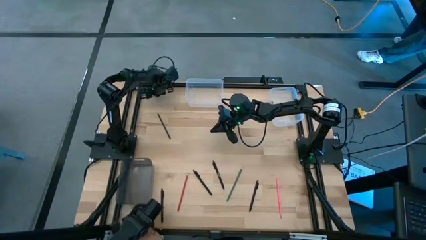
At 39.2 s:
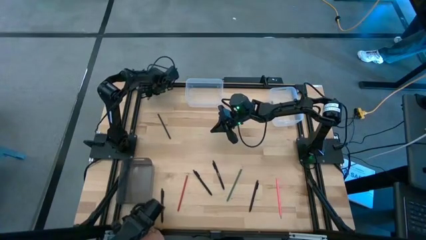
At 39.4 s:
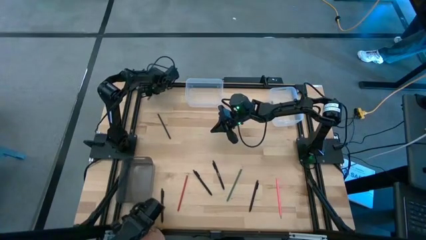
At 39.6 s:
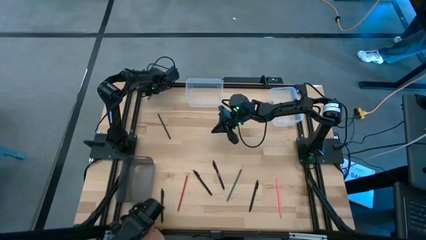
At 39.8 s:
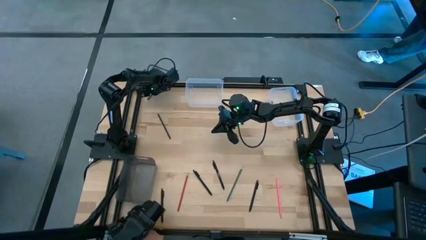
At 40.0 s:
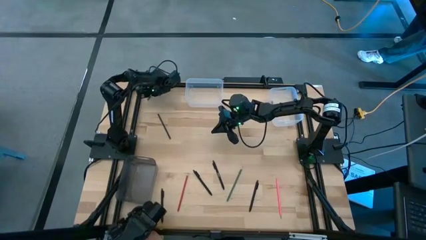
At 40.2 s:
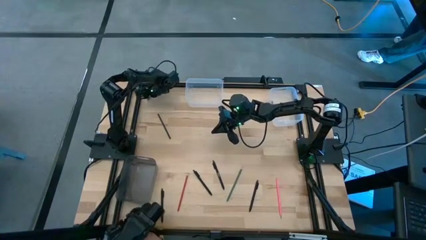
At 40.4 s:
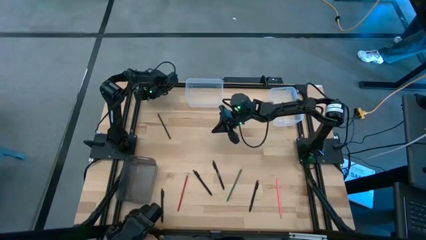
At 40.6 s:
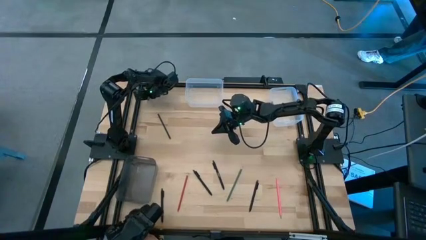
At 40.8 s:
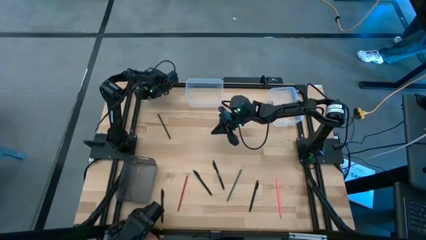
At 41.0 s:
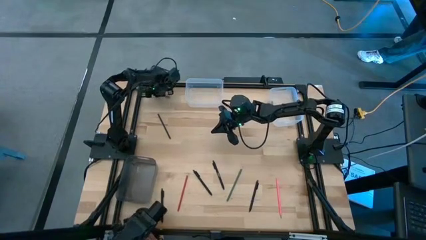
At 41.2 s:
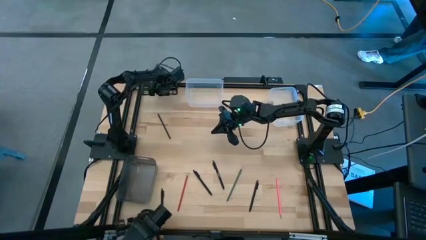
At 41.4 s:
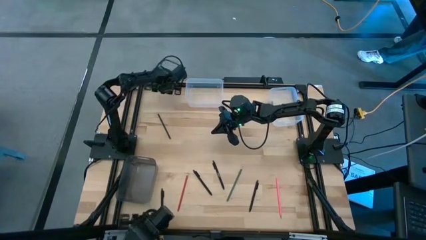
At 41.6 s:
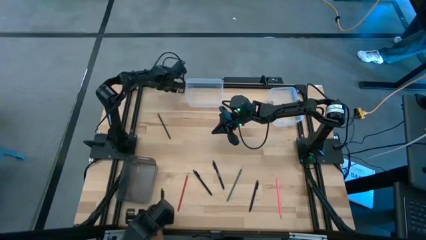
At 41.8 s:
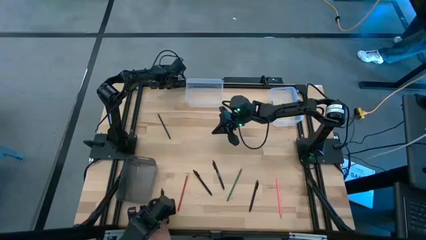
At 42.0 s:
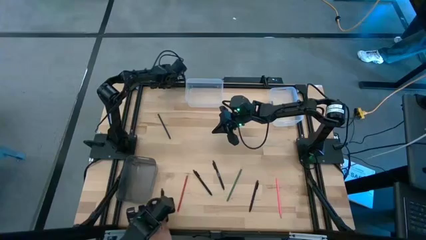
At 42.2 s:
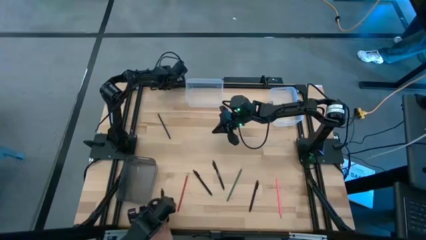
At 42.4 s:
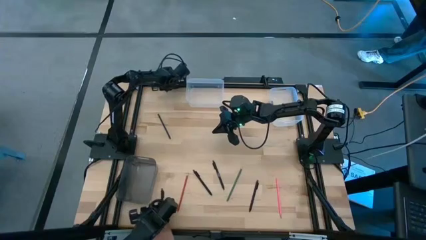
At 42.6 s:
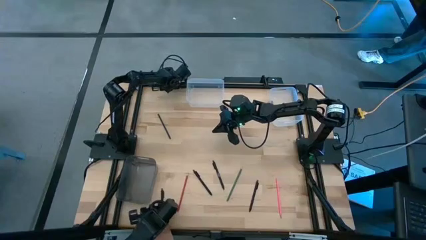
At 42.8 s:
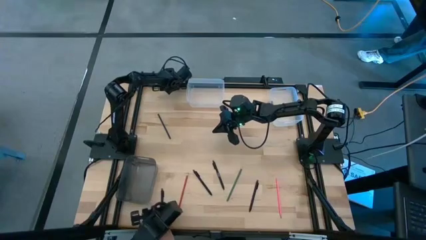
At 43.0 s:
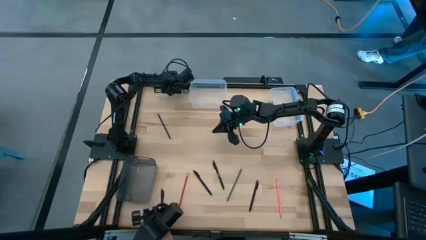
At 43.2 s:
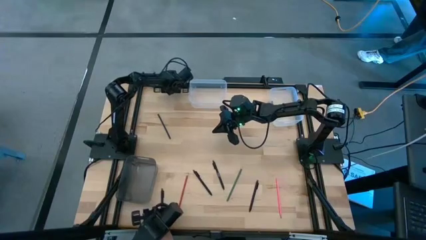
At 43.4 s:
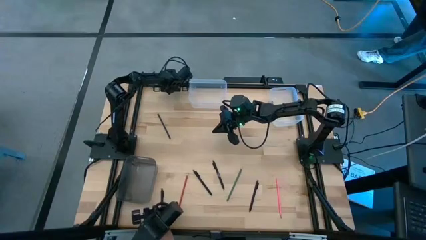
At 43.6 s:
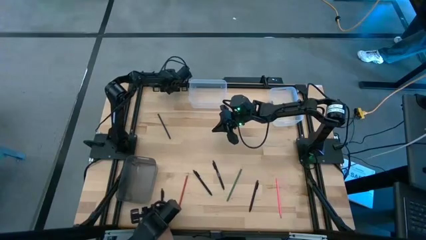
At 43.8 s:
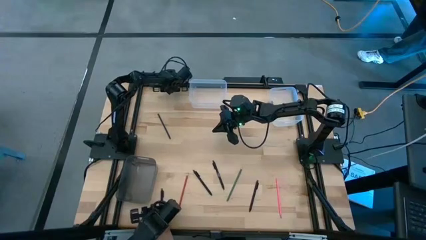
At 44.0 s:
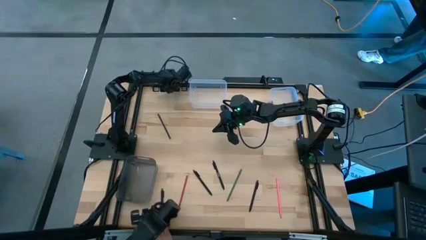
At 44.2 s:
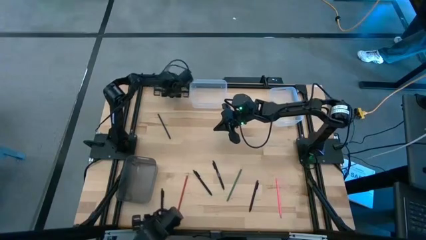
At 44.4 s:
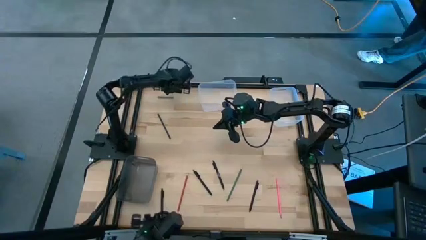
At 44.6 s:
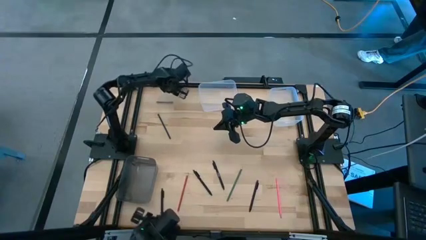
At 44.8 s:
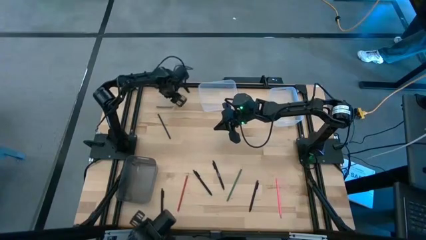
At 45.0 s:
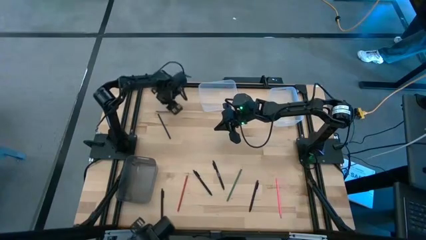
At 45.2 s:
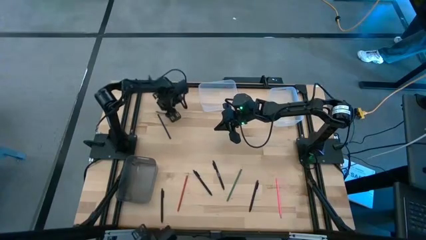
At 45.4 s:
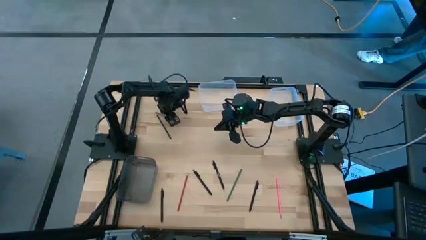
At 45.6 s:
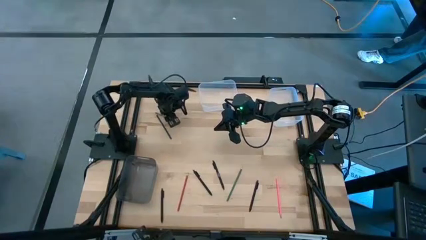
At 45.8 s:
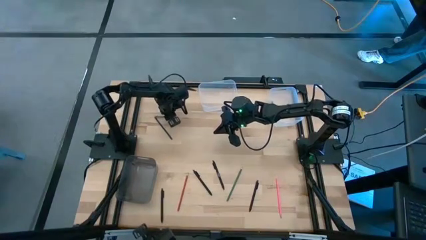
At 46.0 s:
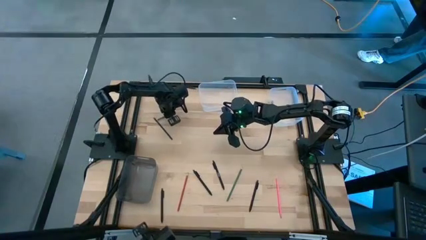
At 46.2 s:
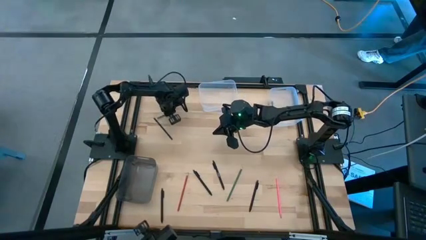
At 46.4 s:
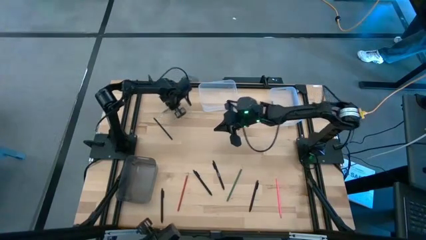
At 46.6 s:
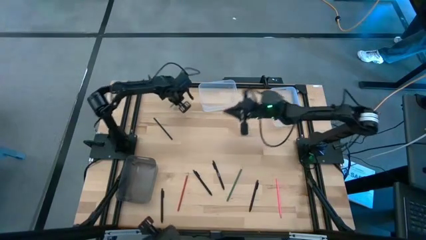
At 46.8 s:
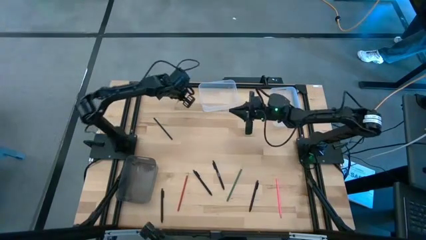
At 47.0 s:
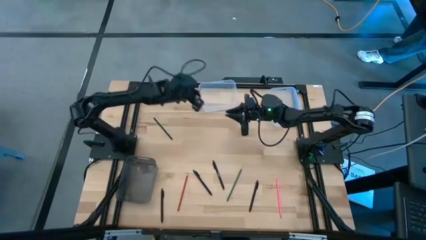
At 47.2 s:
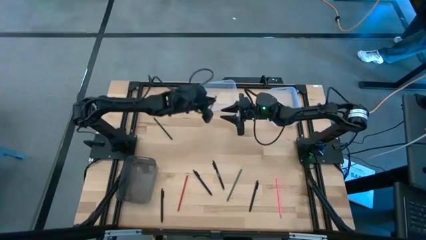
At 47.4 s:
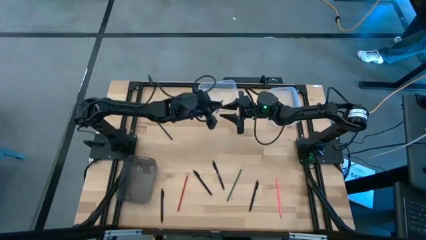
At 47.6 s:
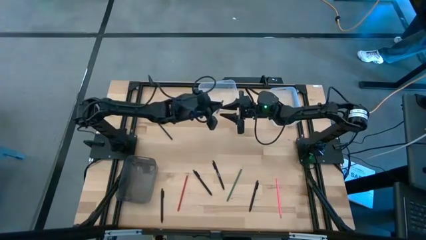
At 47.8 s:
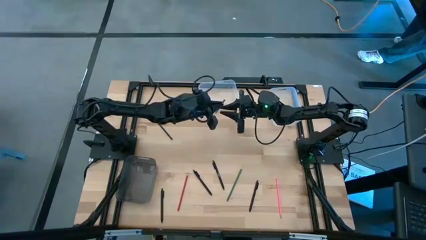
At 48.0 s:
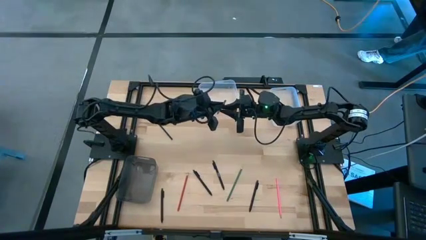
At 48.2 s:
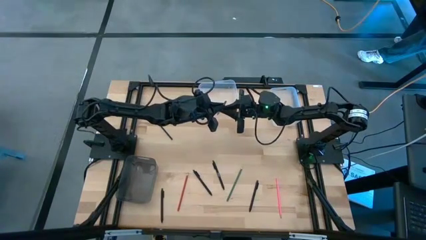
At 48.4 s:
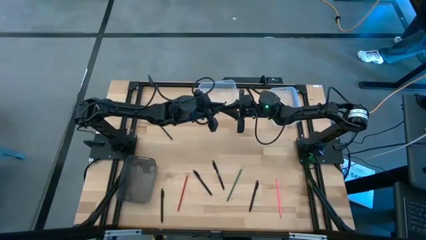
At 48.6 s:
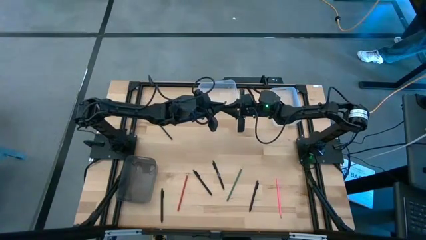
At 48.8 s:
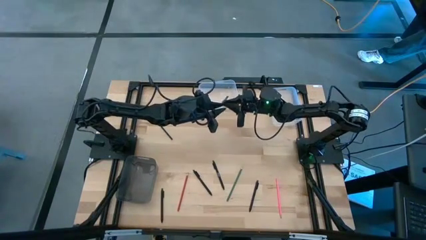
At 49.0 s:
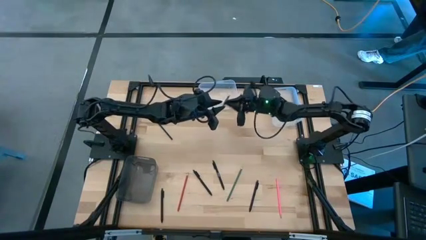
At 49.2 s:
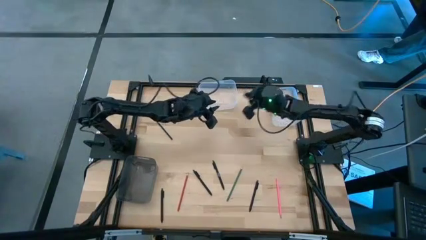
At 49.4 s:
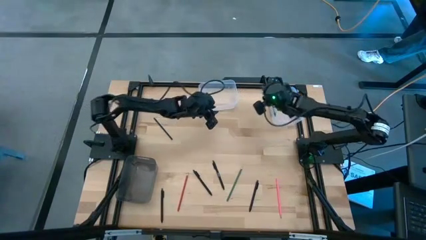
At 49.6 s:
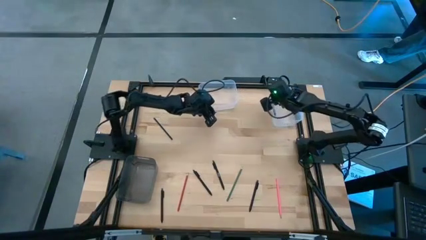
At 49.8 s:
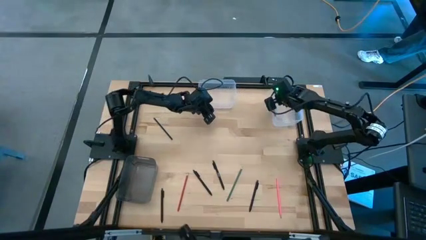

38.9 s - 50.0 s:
Task: Sort crayons/erasers/pens/pencils in bins
Put the gray crayon into the right transparent bin

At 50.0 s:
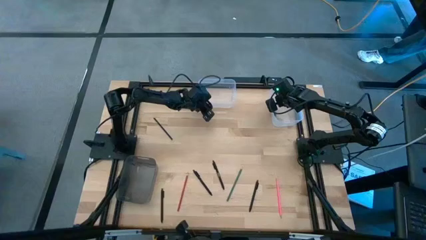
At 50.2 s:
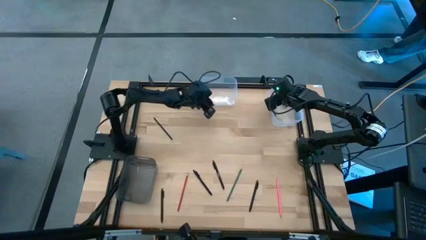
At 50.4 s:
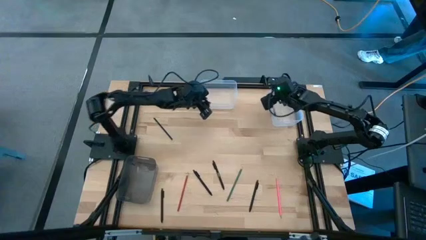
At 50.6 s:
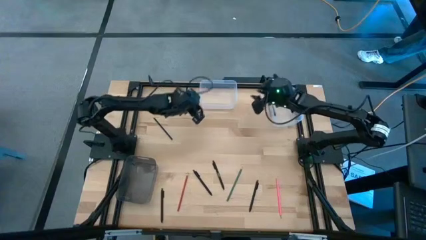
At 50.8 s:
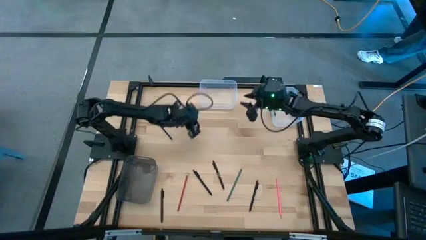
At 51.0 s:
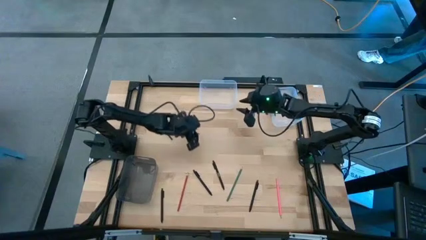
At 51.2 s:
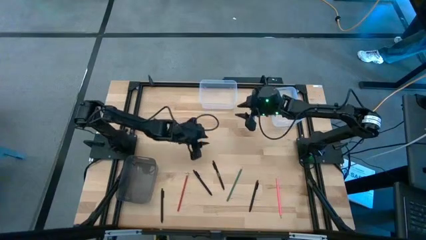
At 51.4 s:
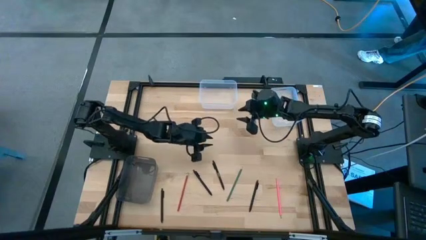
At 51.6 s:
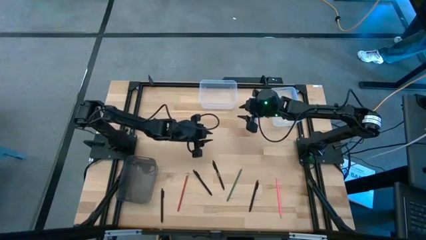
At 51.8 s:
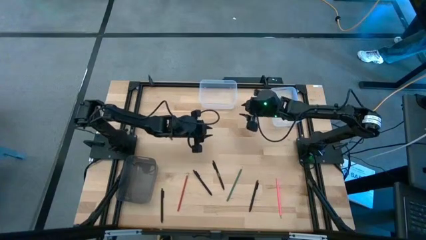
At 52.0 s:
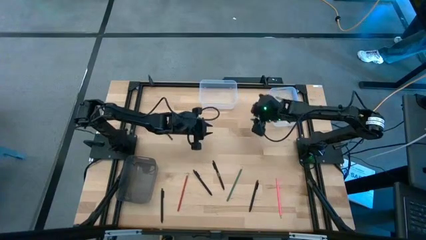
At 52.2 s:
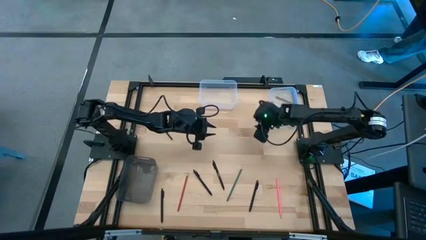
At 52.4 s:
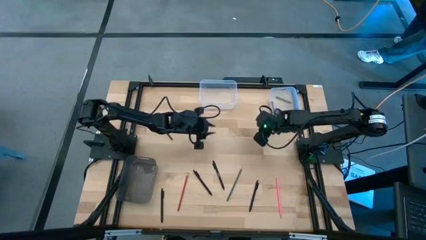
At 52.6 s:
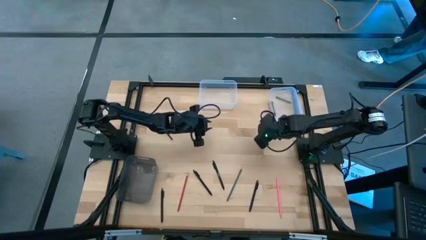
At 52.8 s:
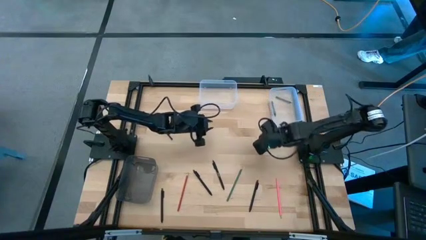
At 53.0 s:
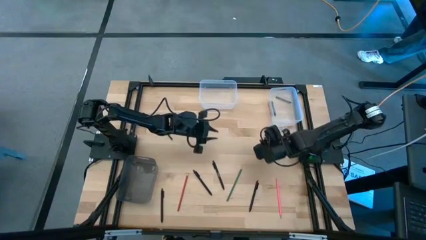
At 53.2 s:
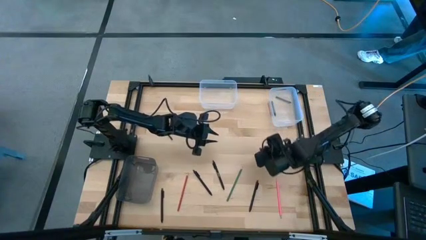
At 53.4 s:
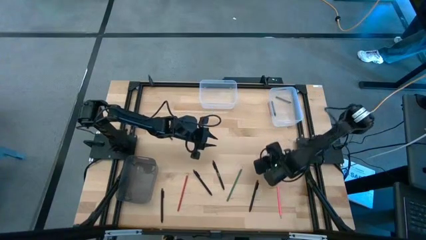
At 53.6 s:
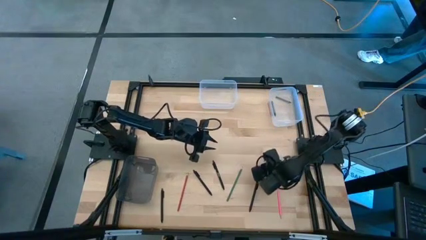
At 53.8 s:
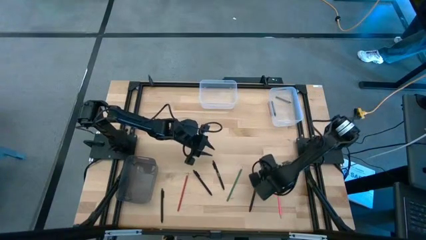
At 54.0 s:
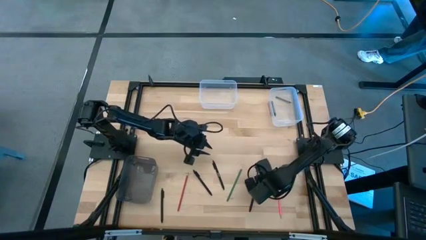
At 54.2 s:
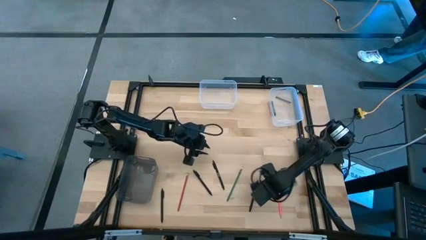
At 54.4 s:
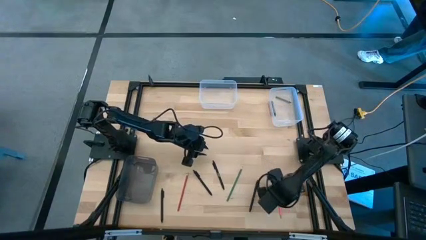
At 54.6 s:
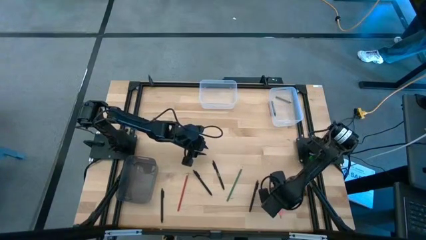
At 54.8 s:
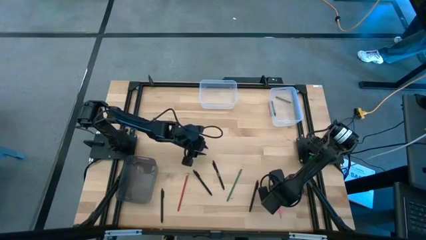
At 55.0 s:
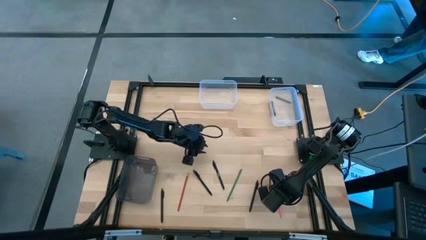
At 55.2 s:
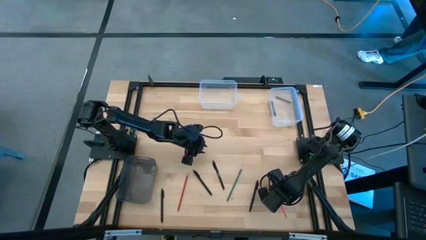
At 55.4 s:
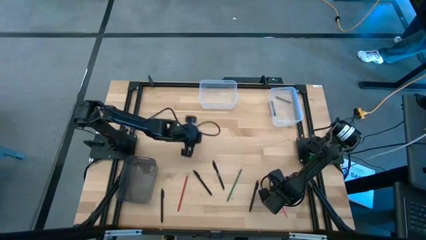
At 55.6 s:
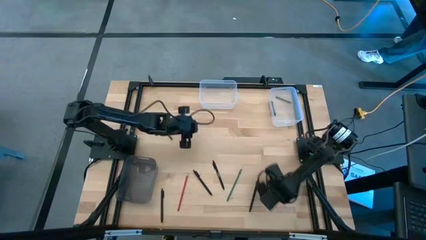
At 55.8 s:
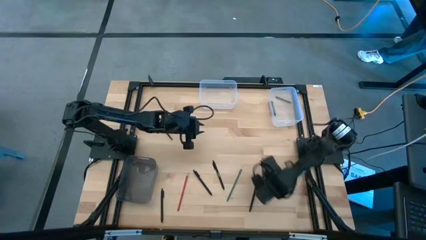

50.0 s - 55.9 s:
Put the pink pencil into the left transparent bin
